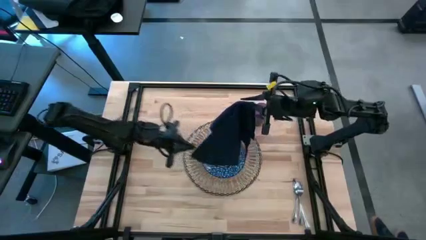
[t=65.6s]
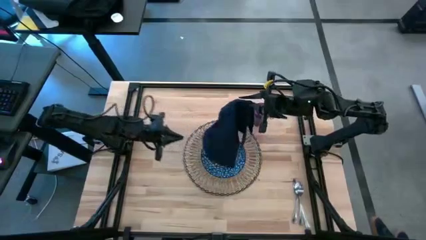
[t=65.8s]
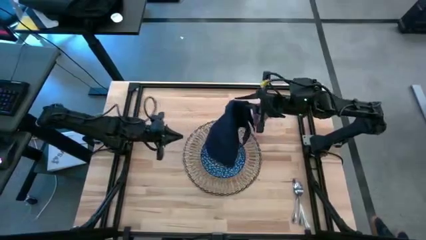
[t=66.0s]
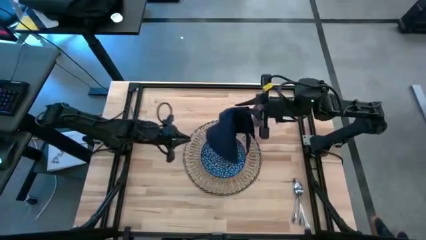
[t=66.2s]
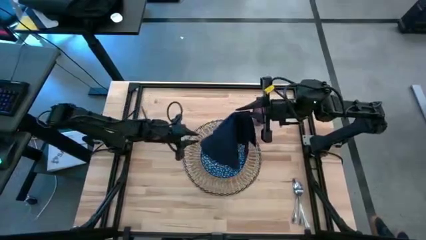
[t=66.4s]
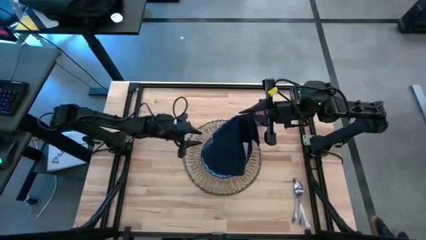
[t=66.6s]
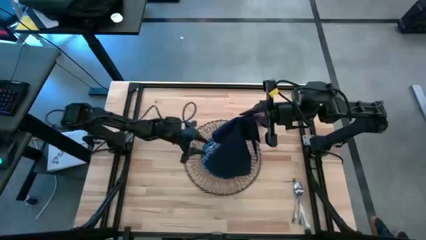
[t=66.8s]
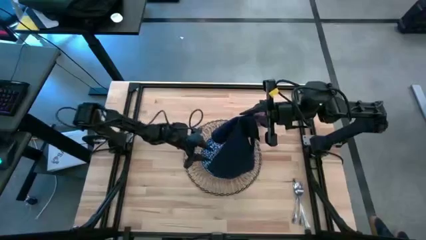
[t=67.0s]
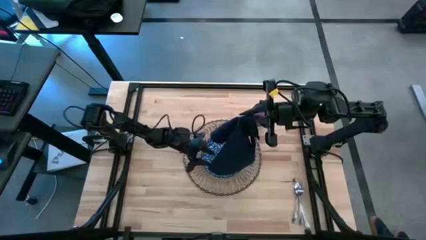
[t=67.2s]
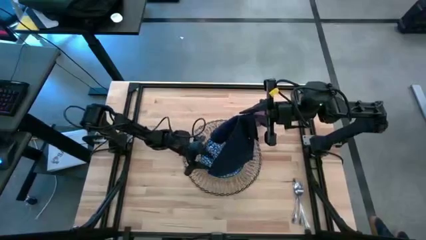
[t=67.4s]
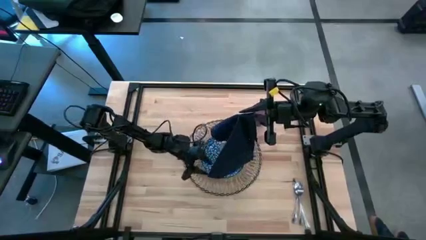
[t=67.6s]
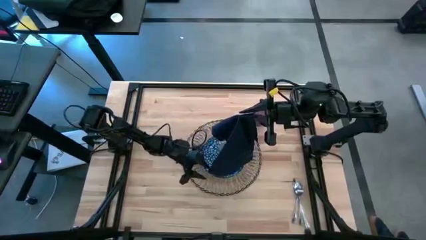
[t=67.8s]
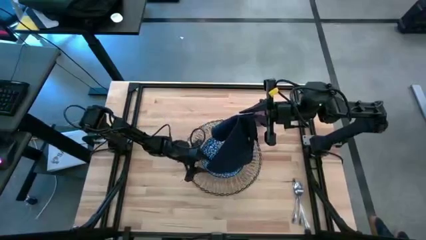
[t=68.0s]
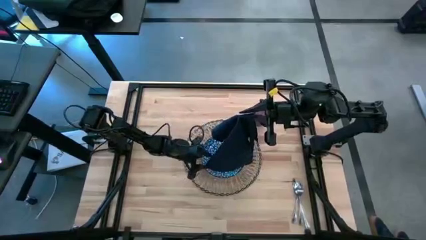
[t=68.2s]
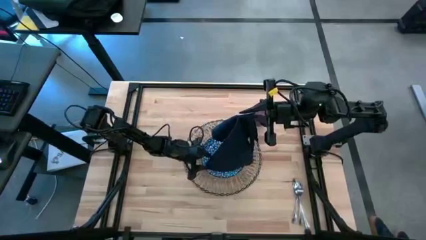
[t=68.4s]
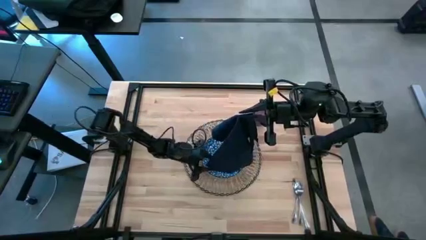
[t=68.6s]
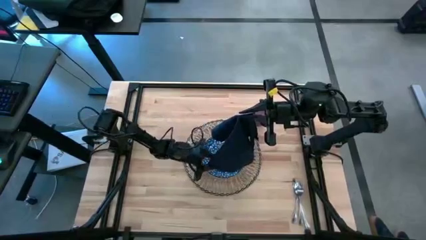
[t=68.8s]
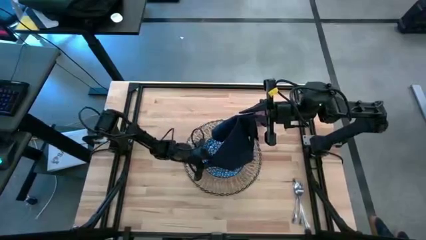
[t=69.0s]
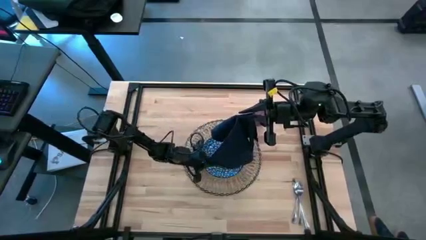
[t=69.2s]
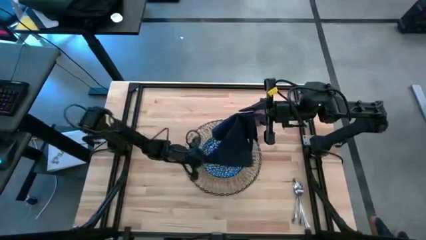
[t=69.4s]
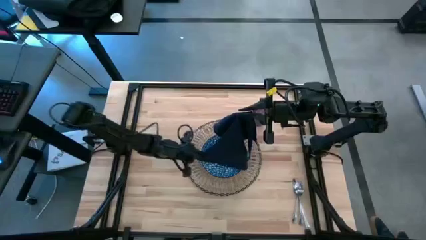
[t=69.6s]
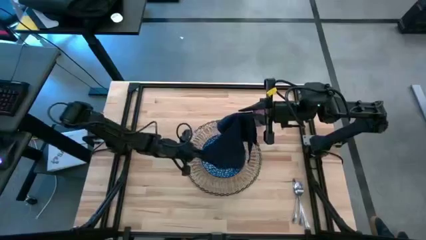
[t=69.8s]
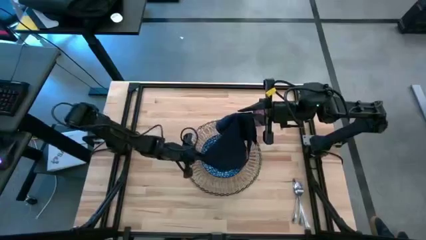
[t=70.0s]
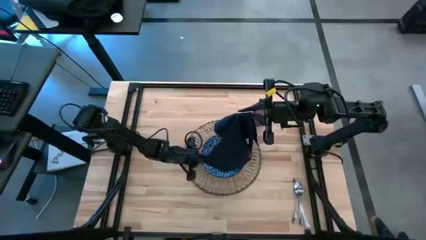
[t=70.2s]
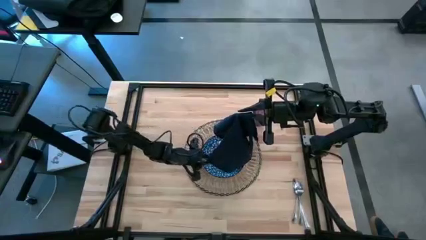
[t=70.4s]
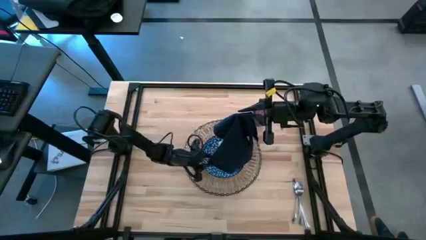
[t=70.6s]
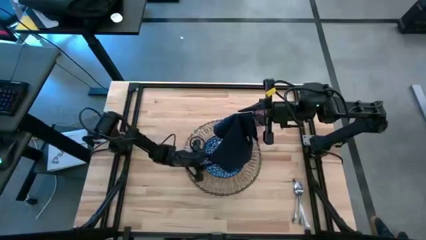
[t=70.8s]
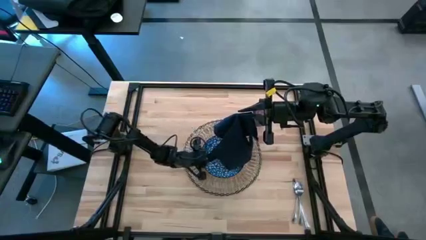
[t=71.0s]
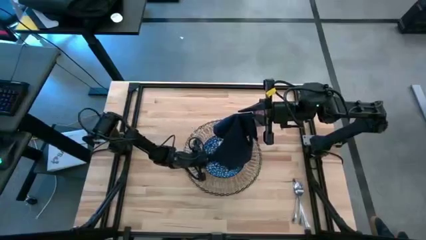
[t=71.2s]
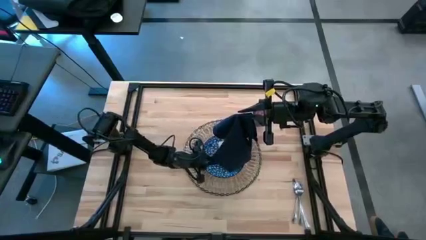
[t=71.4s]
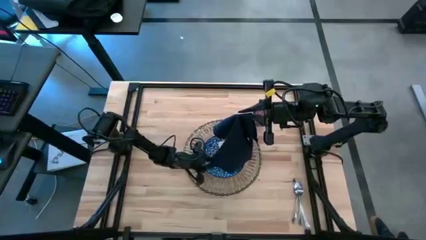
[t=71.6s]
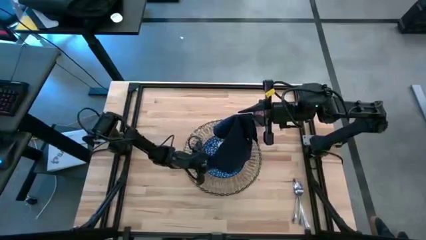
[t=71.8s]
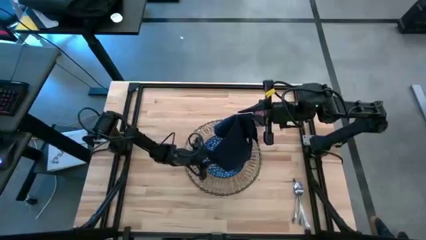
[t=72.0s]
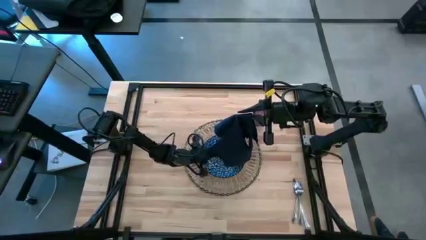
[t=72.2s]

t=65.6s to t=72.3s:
Task: Set table place
Fold the blue table napkin

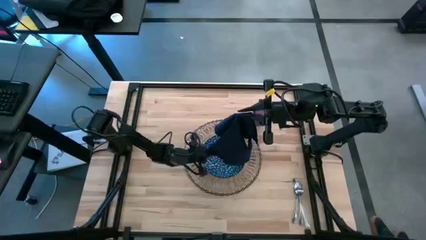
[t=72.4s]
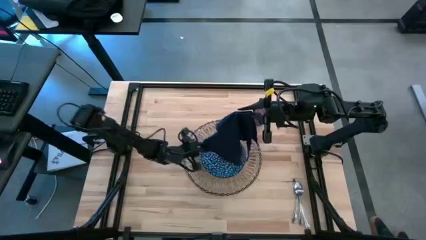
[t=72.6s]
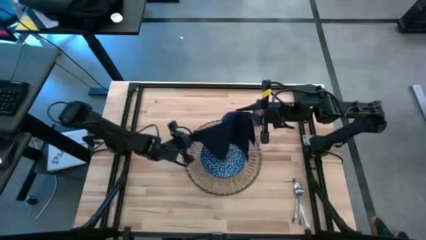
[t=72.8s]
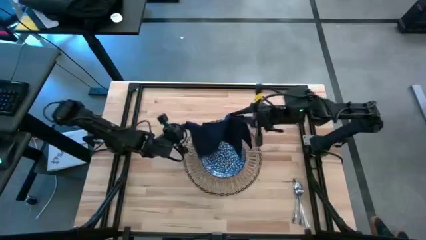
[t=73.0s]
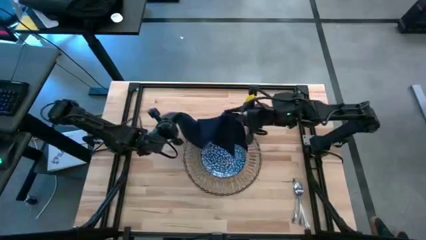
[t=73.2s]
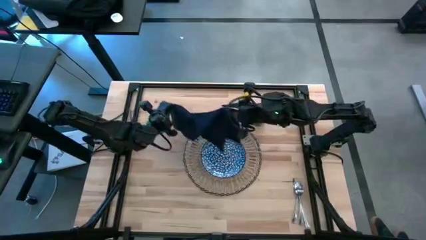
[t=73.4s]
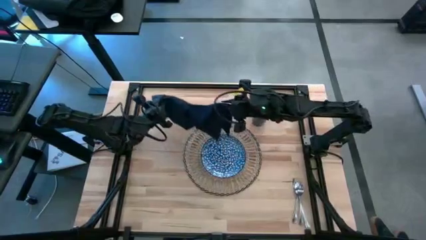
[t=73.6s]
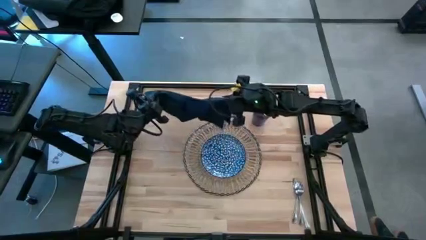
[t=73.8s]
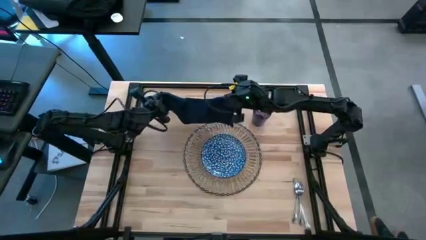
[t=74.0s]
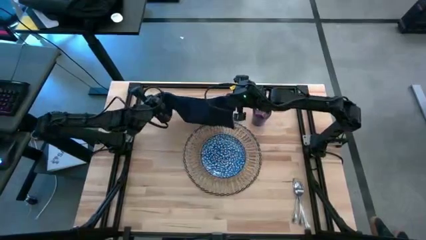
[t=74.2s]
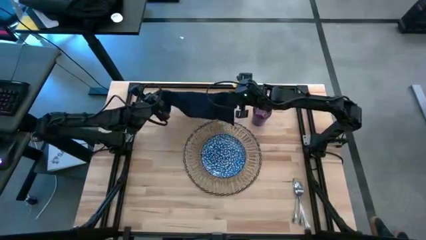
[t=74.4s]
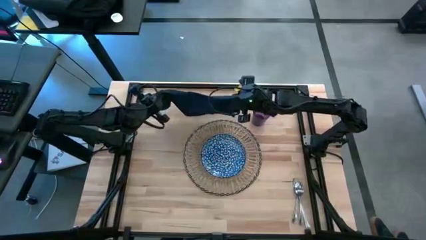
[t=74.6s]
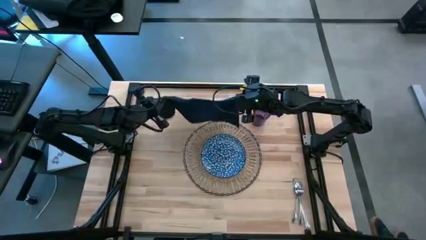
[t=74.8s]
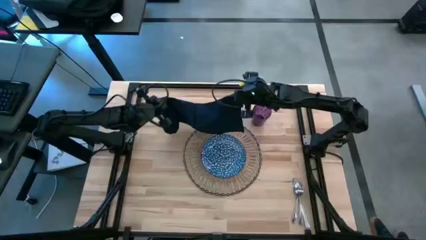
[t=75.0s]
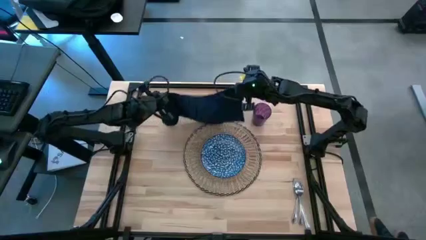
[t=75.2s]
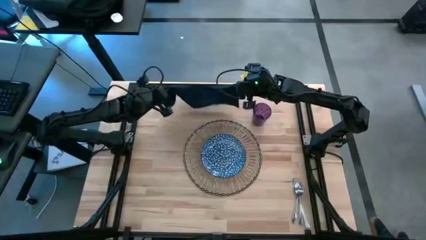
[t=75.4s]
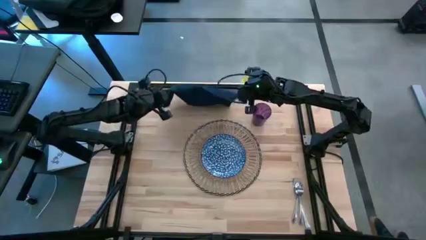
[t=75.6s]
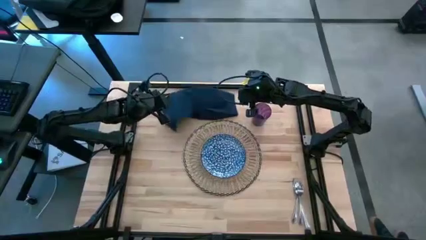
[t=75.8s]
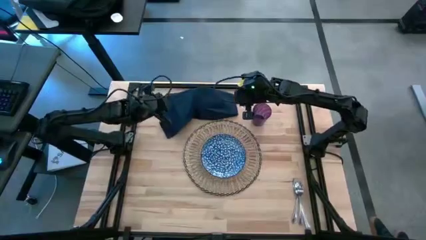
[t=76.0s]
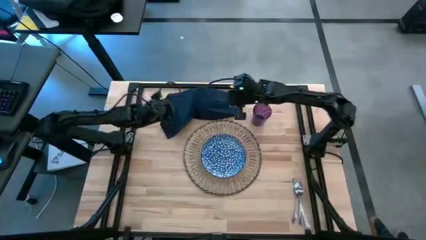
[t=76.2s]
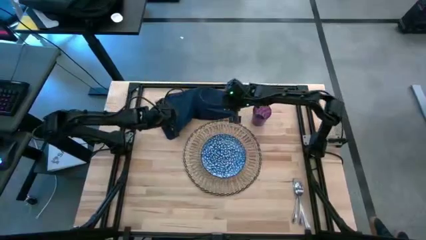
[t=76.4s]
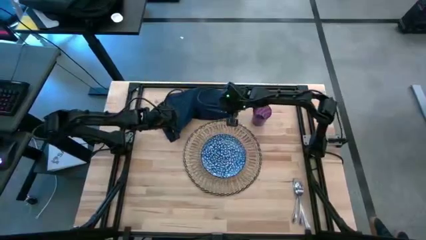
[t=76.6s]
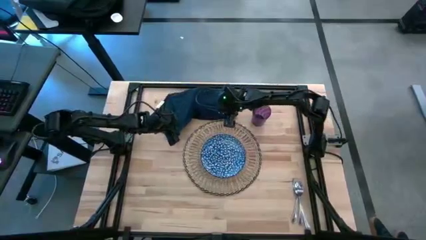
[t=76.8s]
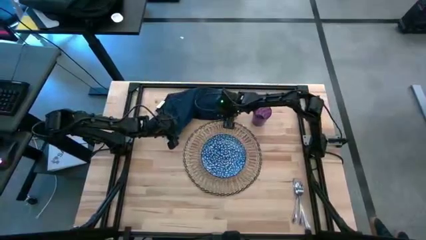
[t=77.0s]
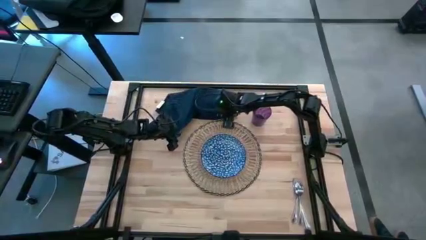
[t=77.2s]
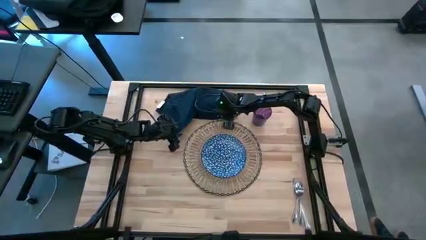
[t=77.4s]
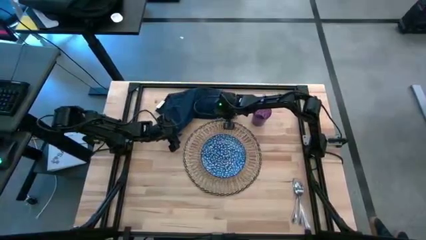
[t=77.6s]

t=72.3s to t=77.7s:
Fold the blue table napkin

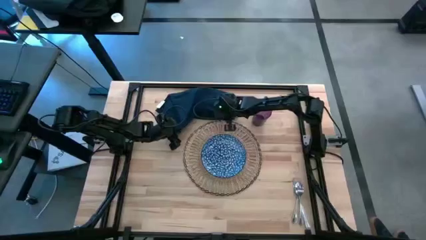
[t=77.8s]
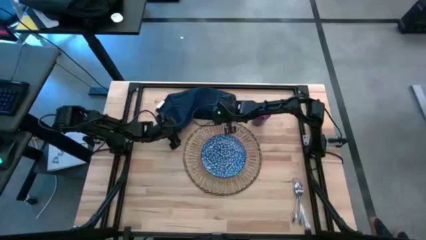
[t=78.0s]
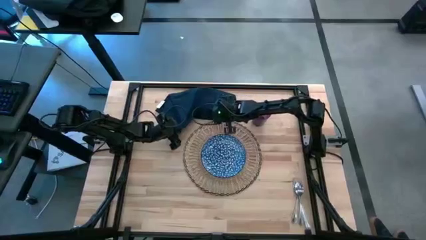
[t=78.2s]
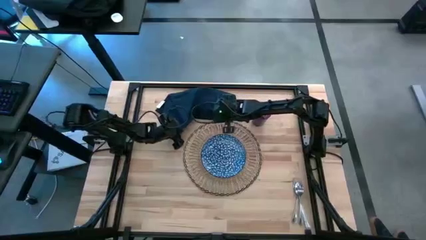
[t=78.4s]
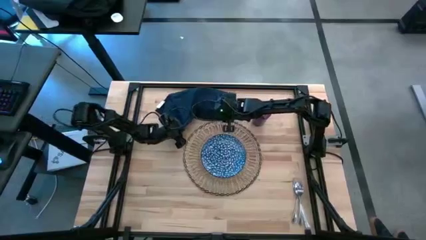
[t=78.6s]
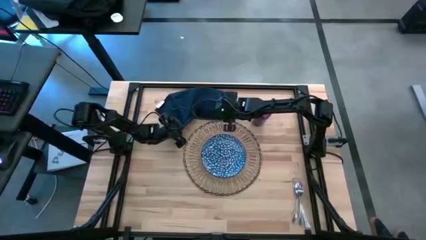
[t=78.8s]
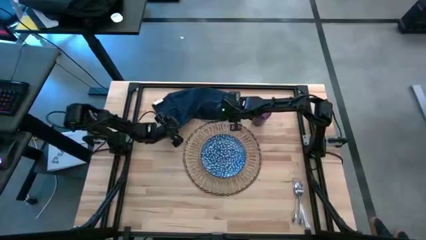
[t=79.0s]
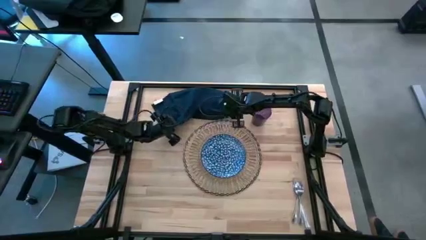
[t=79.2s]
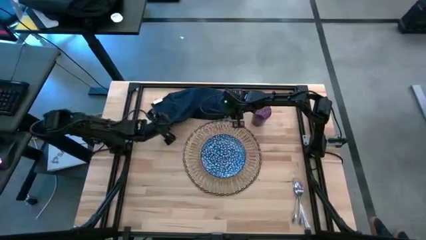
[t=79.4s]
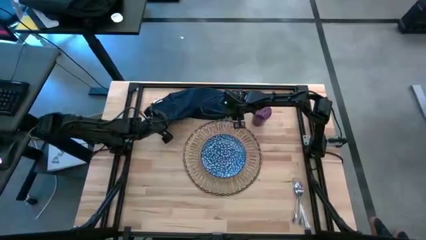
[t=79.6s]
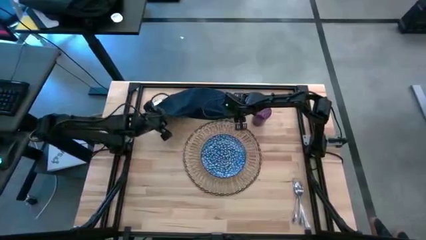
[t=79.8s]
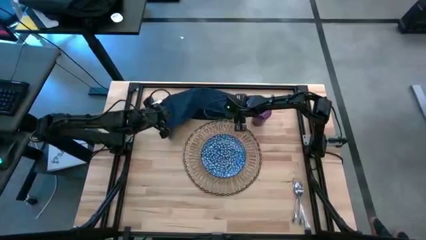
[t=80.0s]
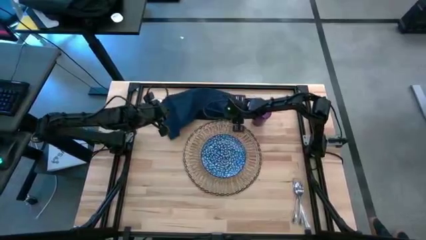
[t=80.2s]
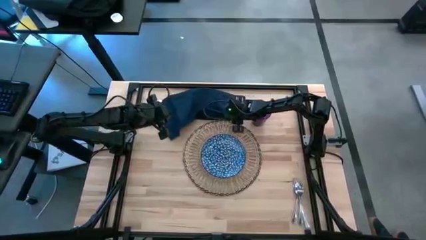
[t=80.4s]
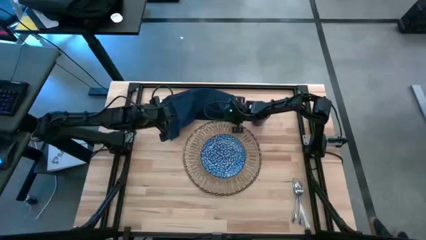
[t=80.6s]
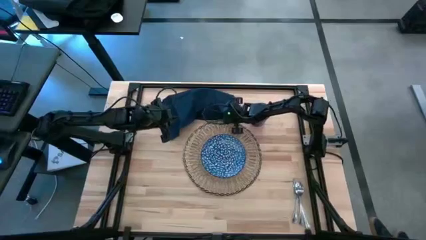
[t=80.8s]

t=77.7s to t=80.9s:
Fold the blue table napkin

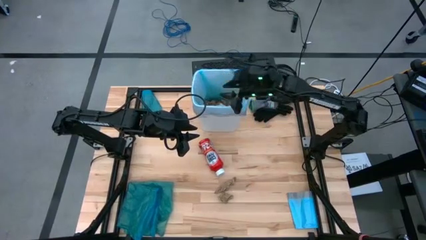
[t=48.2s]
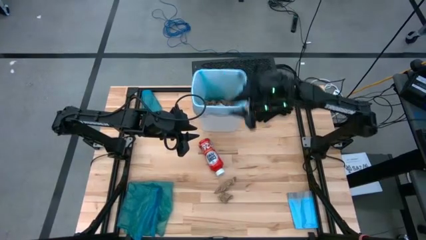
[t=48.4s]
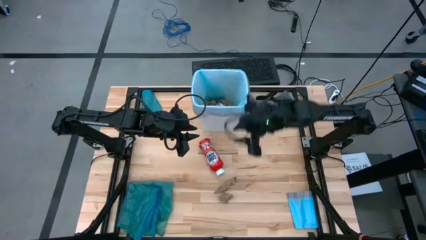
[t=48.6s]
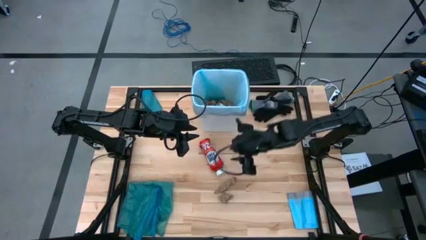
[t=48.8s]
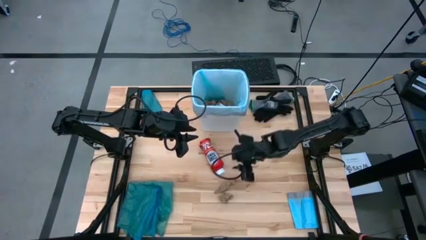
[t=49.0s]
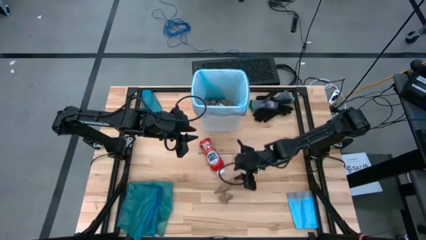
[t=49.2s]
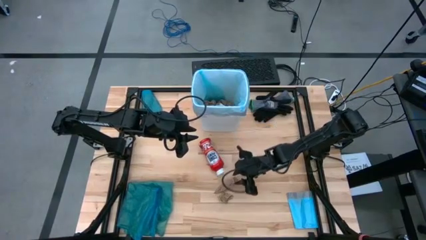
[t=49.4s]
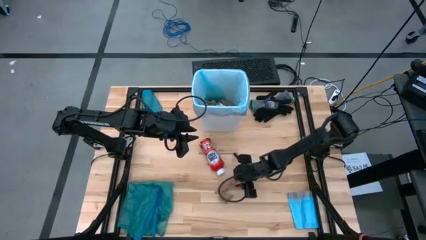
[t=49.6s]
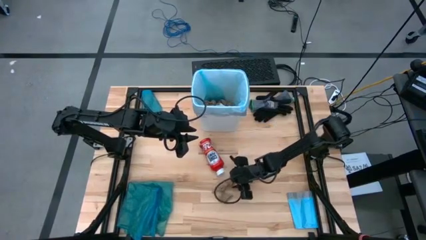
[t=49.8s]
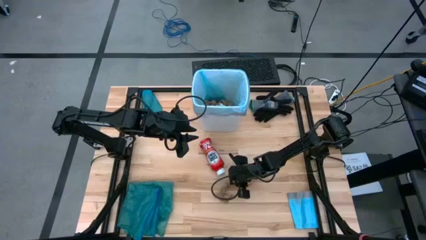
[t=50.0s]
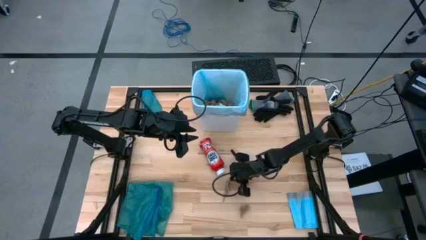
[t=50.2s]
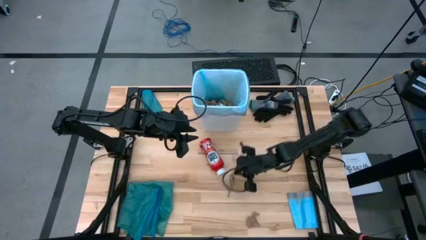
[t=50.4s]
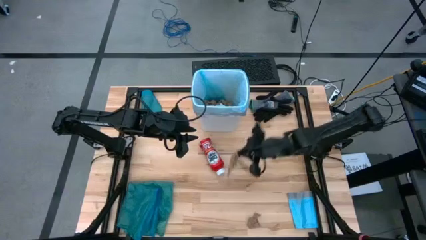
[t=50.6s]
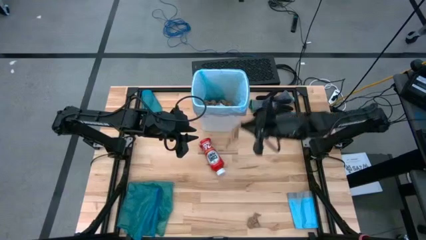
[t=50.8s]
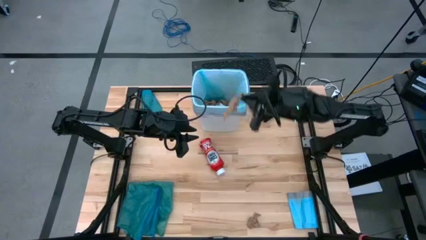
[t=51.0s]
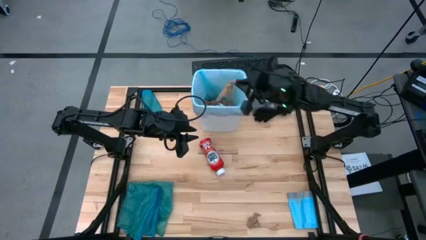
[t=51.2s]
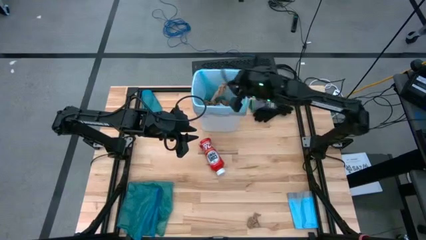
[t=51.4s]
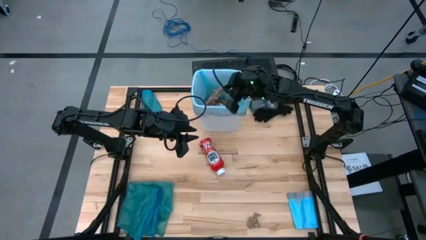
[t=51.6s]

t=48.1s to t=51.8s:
Task: place trash/remove bag and relplace
Put the brown paper into the white trash bin
